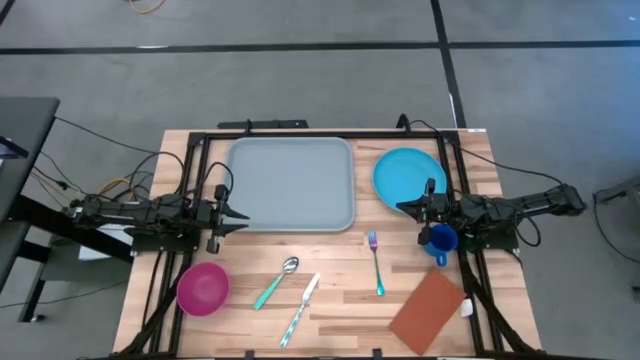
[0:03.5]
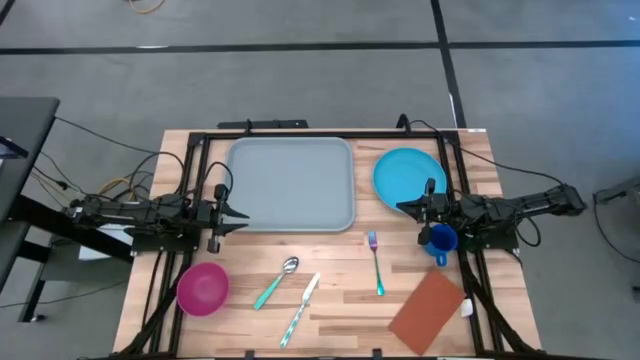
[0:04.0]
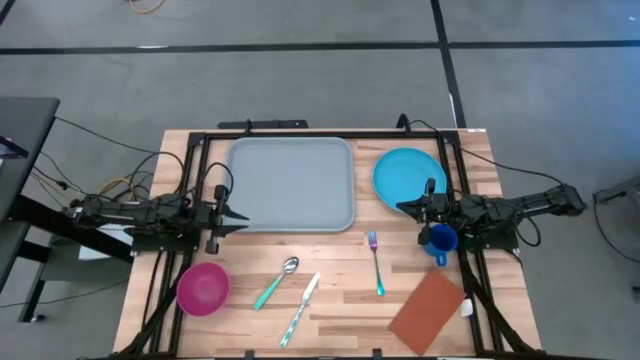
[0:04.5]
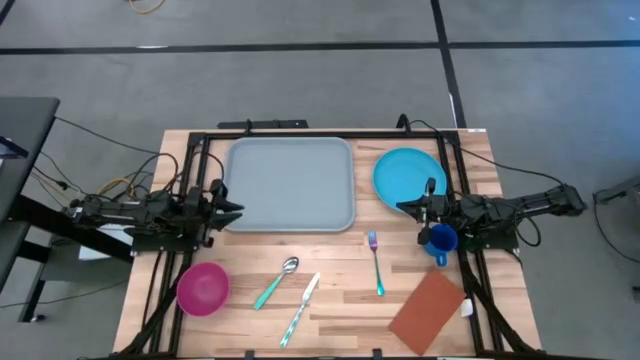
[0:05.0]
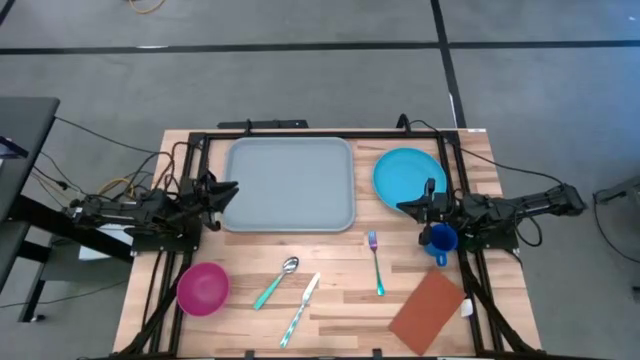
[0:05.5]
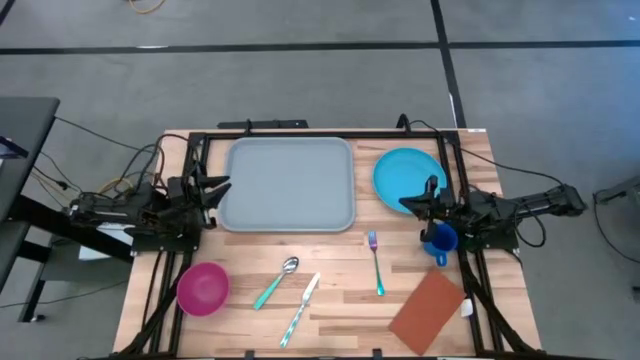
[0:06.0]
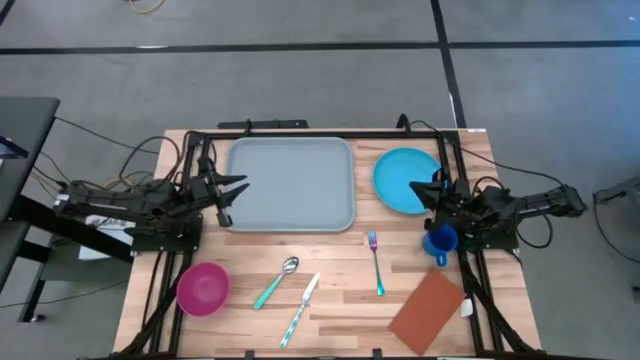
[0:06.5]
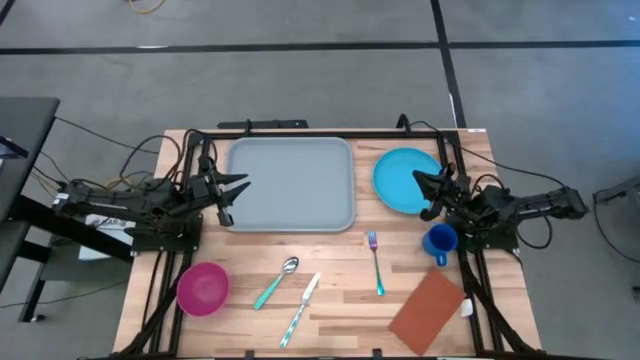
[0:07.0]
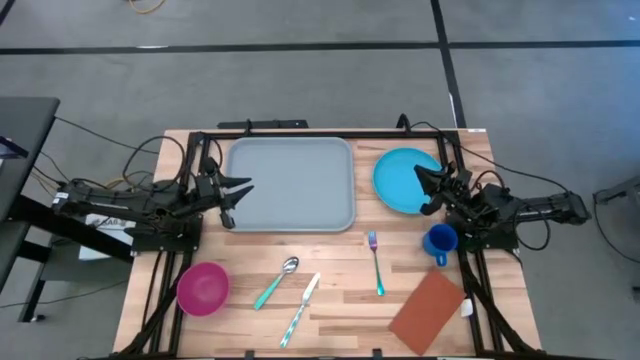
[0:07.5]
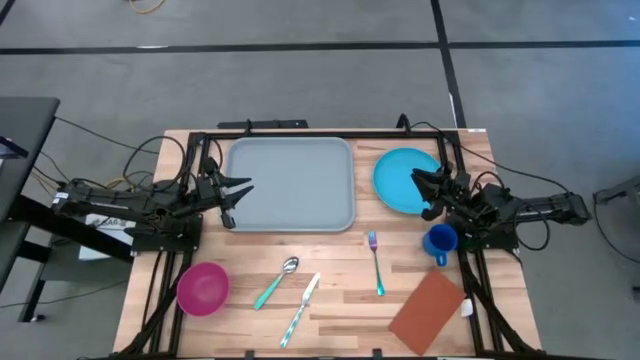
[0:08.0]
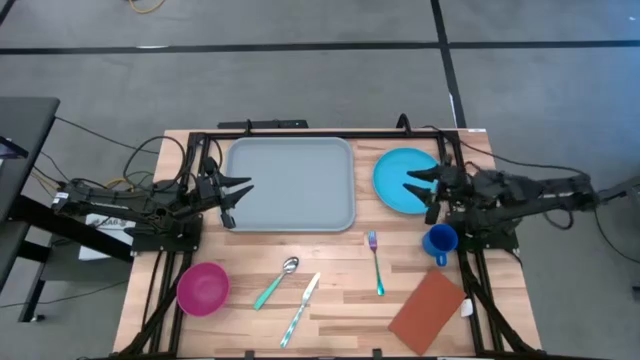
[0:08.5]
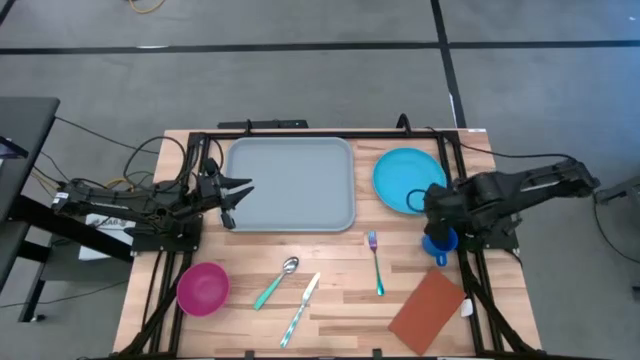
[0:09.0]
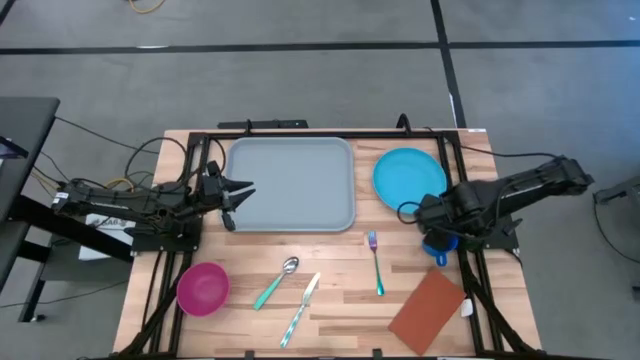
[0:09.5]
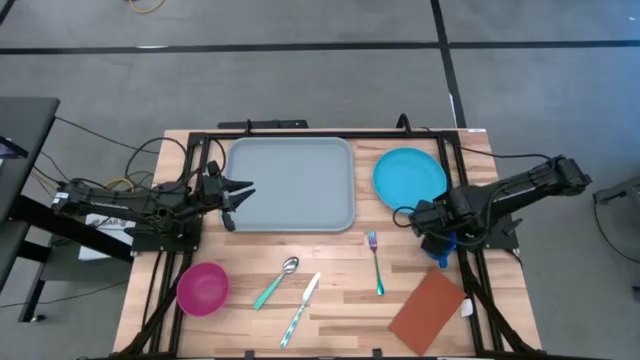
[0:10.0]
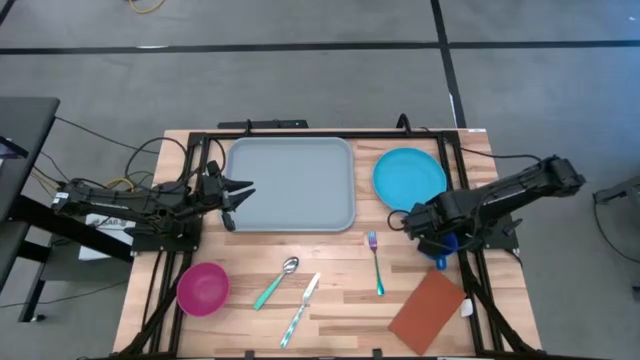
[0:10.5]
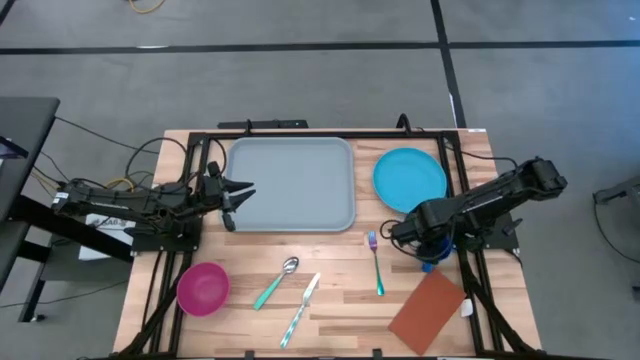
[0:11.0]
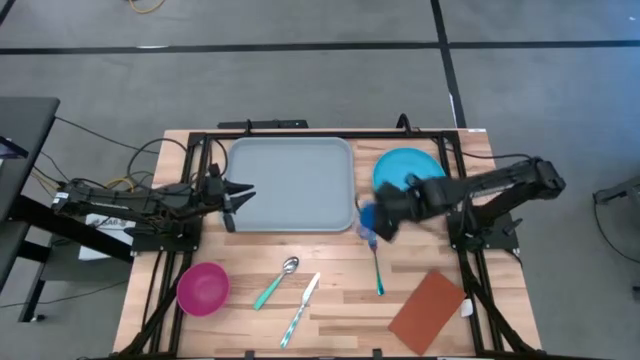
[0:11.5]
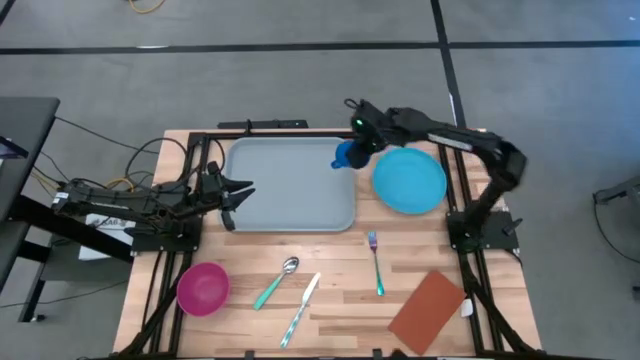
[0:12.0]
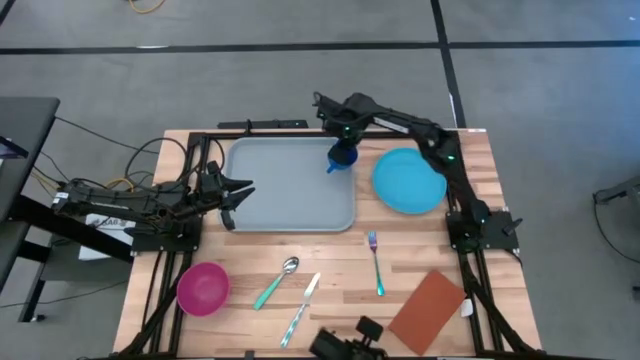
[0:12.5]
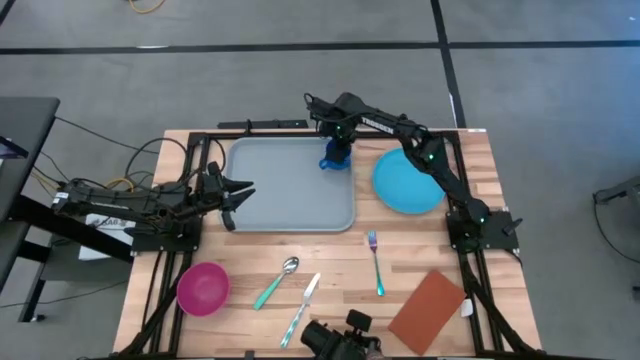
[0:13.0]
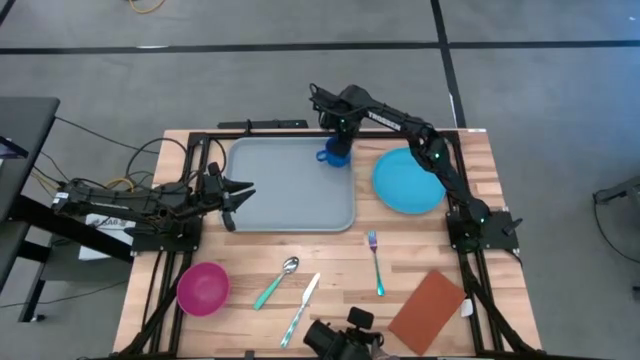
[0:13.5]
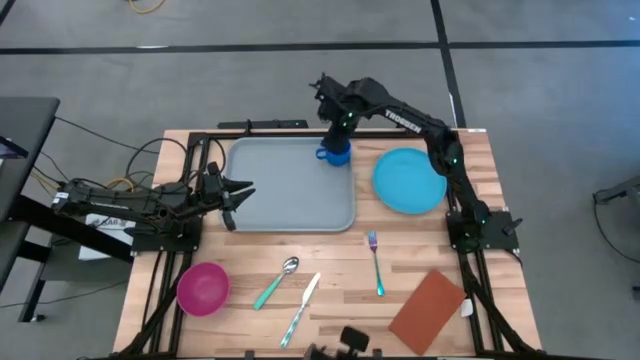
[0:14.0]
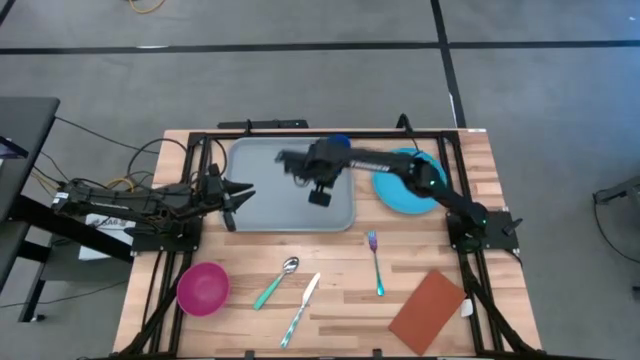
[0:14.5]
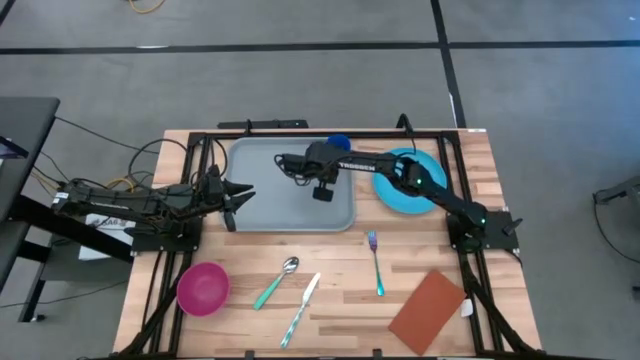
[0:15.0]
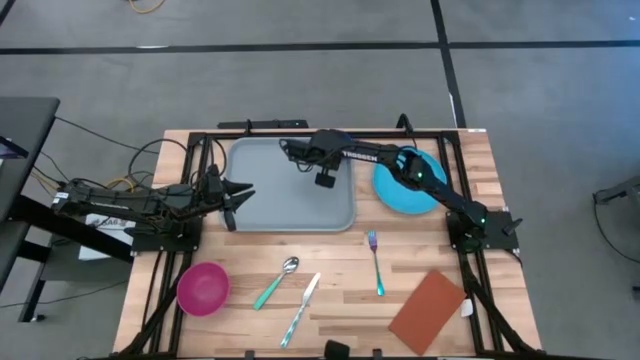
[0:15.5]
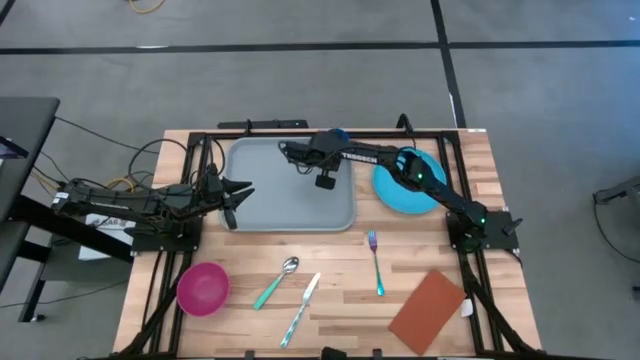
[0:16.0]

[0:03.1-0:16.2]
Task: Set up tray
Put the dark blue mug at the top right of the gray tray

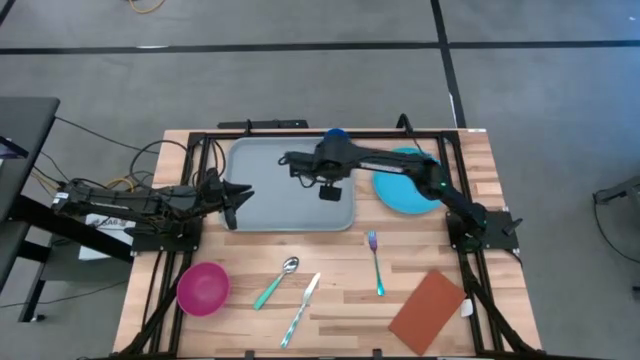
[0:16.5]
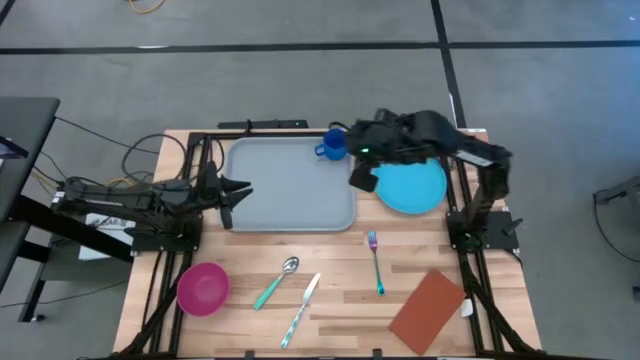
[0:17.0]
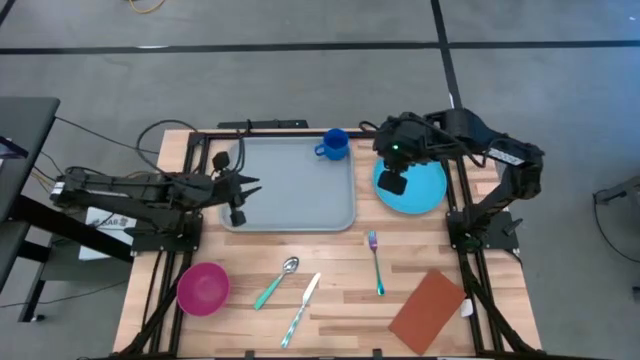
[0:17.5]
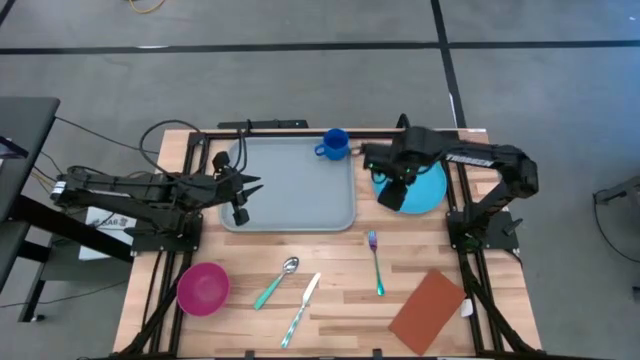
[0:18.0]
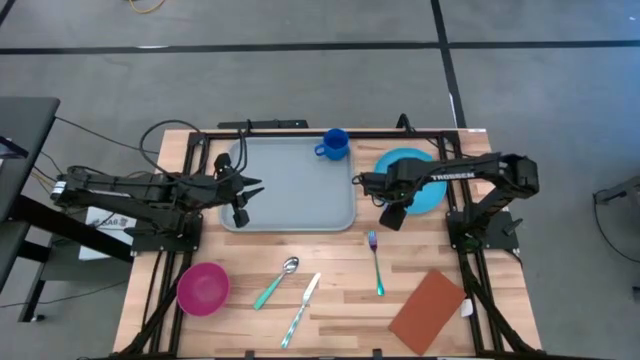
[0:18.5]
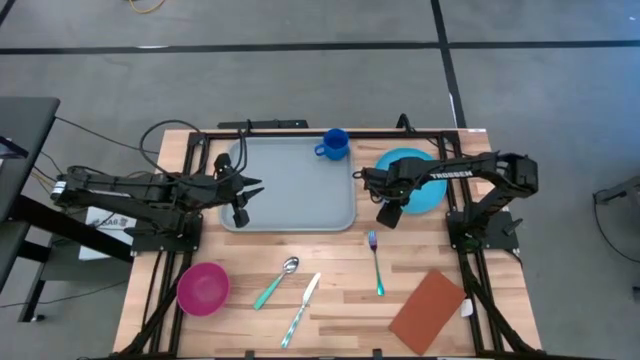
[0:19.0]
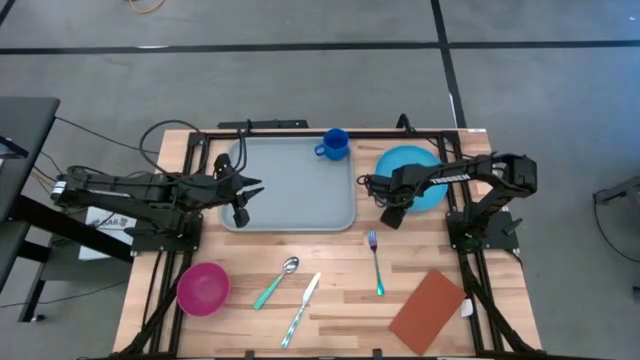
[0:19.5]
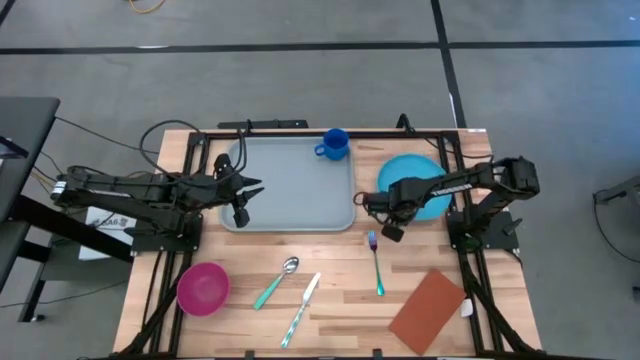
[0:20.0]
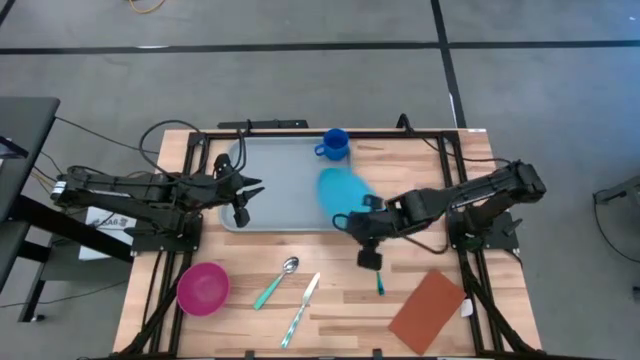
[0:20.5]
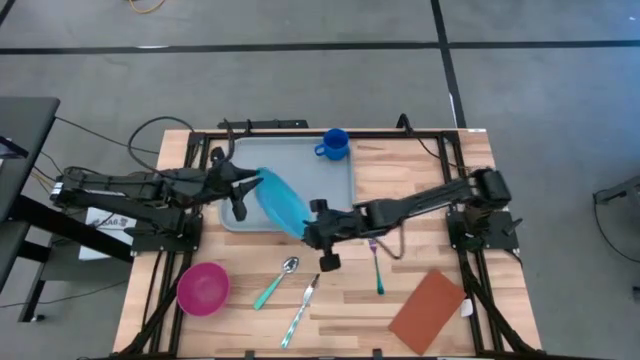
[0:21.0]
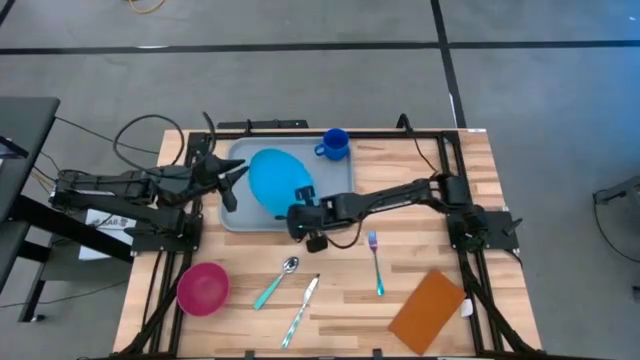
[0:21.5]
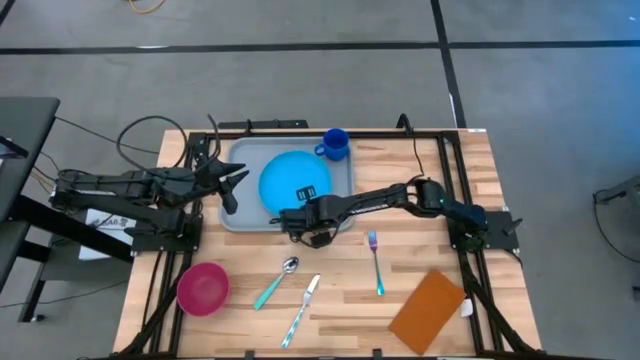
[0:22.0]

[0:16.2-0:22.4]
Put the light blue plate on the gray tray
